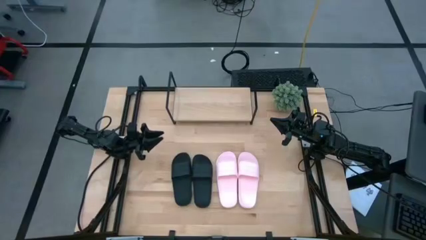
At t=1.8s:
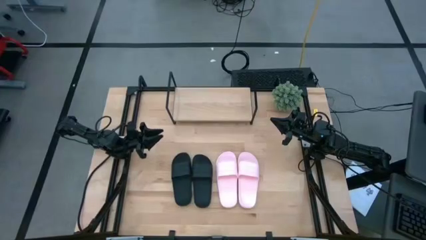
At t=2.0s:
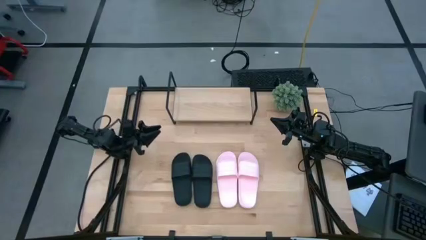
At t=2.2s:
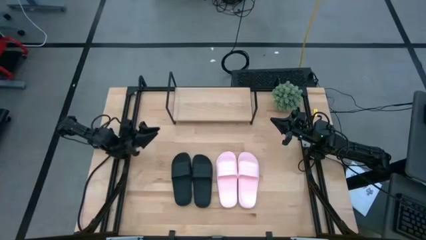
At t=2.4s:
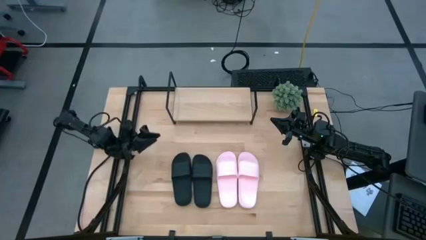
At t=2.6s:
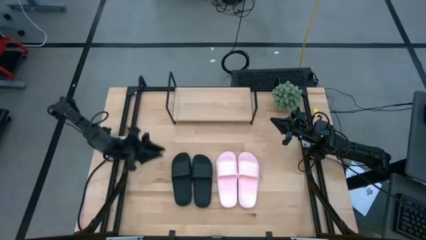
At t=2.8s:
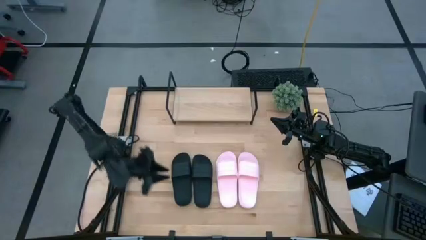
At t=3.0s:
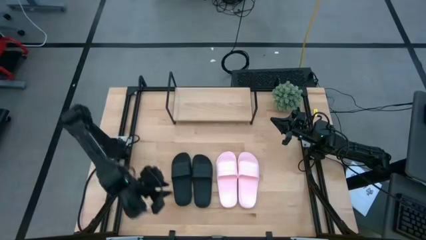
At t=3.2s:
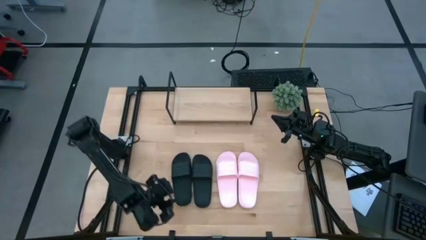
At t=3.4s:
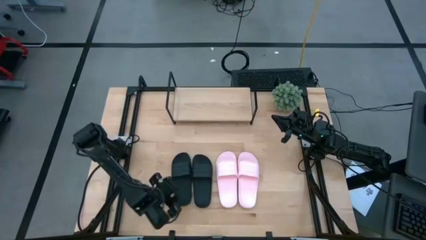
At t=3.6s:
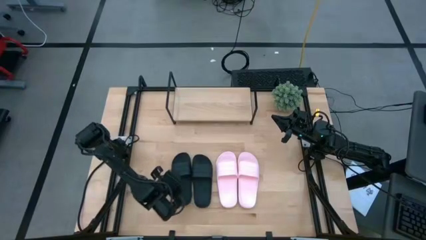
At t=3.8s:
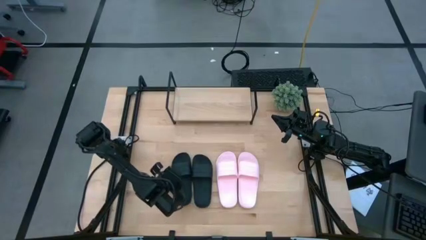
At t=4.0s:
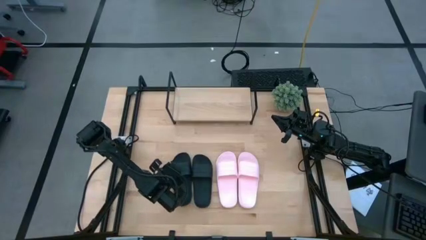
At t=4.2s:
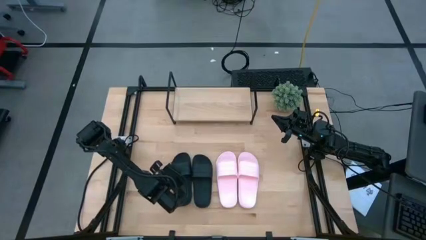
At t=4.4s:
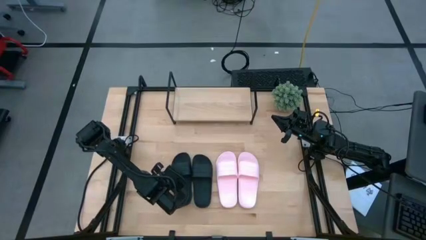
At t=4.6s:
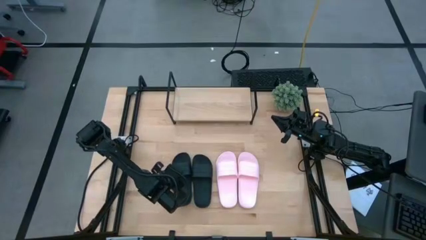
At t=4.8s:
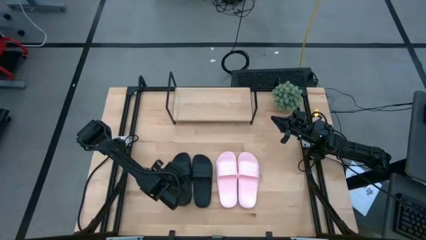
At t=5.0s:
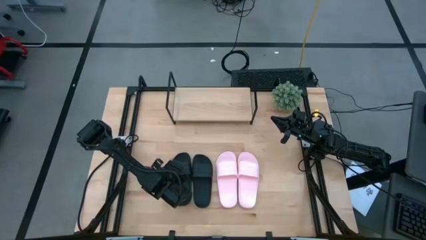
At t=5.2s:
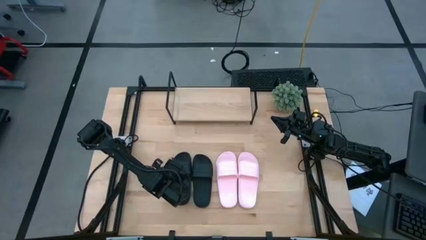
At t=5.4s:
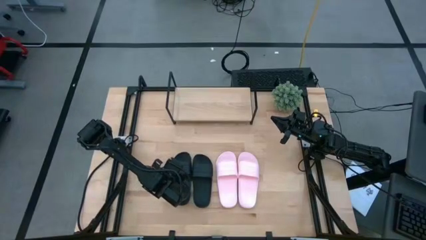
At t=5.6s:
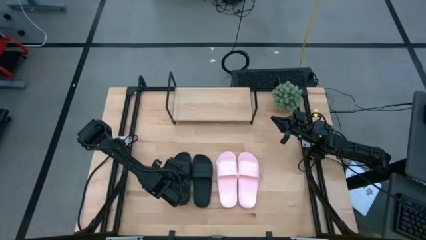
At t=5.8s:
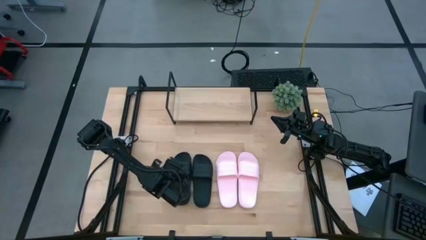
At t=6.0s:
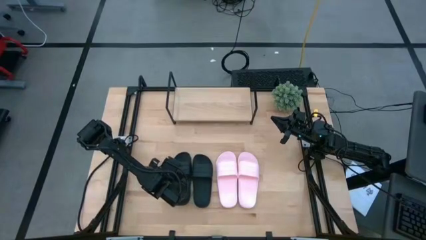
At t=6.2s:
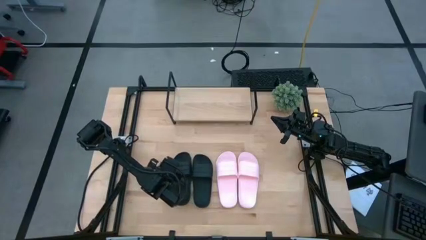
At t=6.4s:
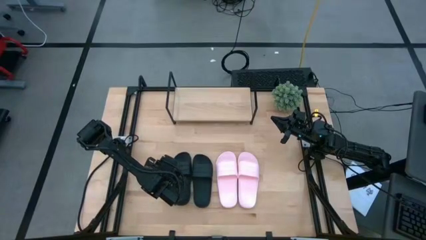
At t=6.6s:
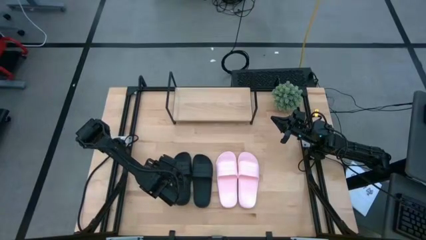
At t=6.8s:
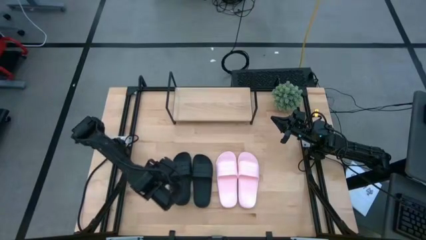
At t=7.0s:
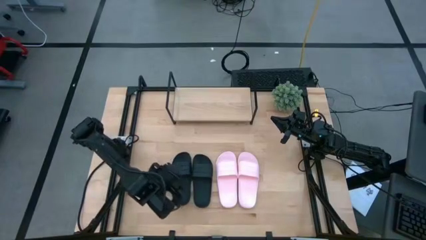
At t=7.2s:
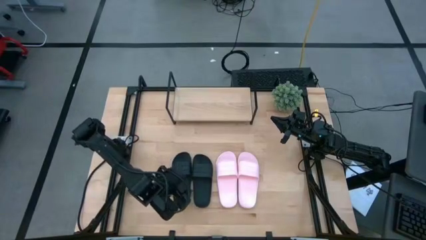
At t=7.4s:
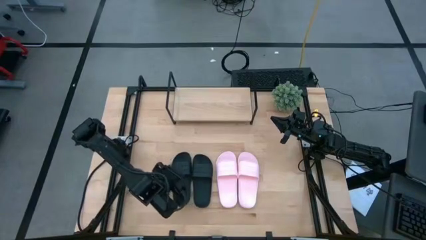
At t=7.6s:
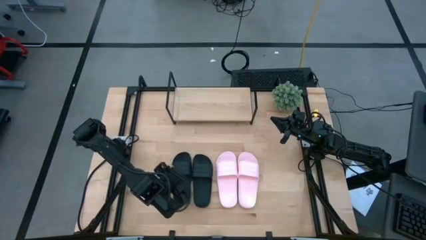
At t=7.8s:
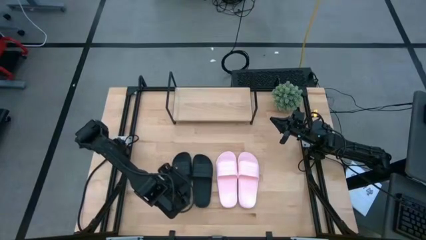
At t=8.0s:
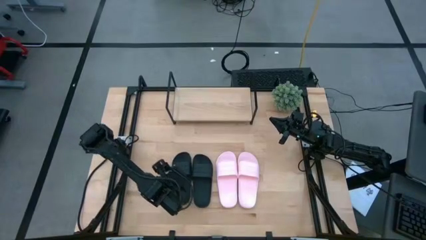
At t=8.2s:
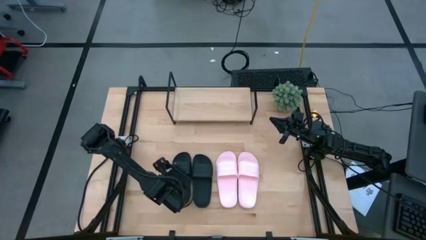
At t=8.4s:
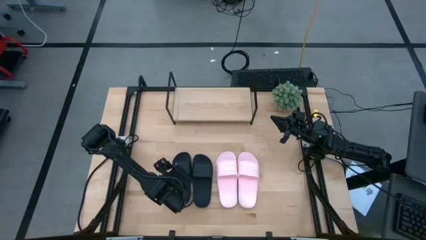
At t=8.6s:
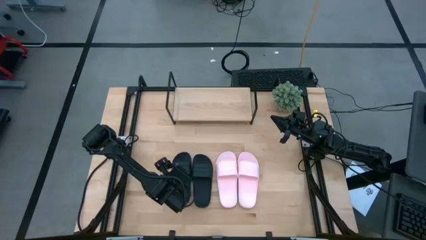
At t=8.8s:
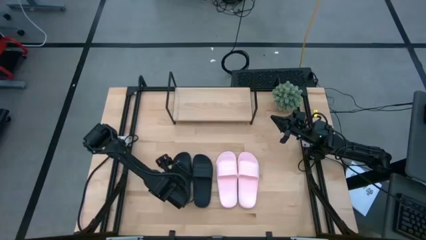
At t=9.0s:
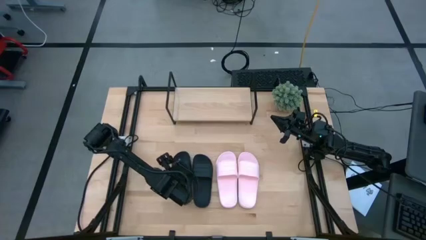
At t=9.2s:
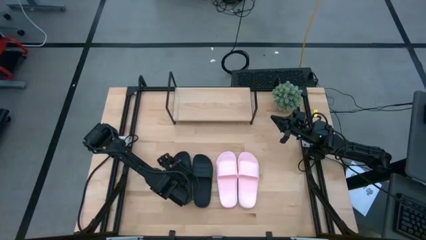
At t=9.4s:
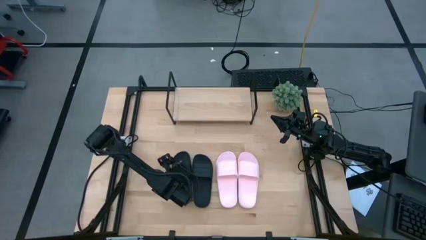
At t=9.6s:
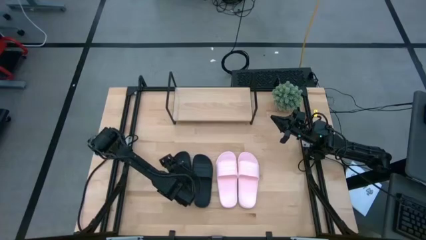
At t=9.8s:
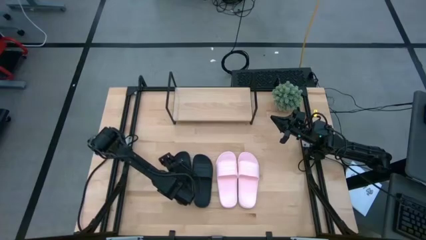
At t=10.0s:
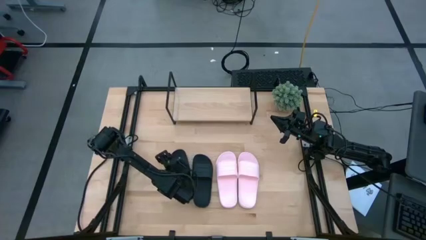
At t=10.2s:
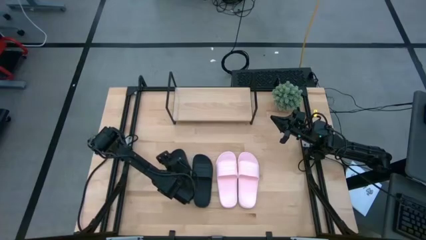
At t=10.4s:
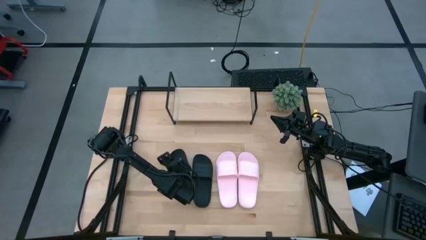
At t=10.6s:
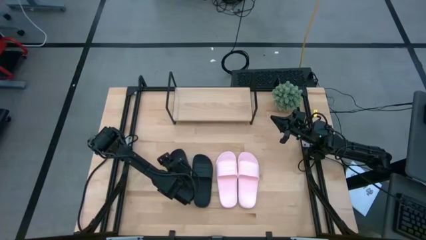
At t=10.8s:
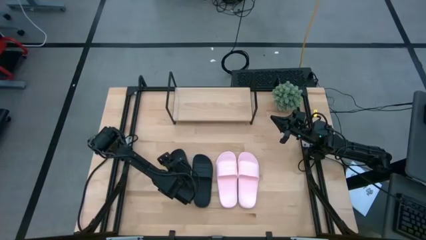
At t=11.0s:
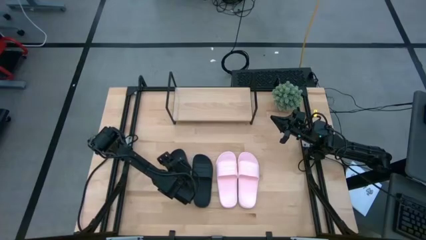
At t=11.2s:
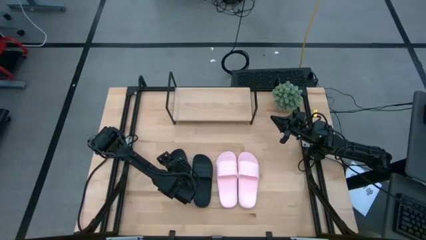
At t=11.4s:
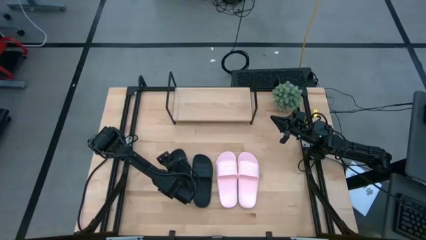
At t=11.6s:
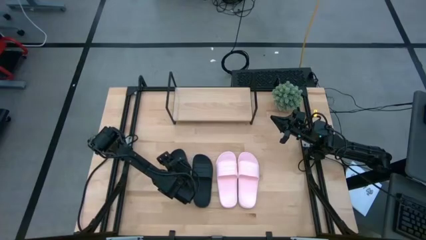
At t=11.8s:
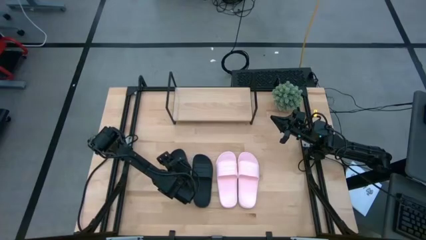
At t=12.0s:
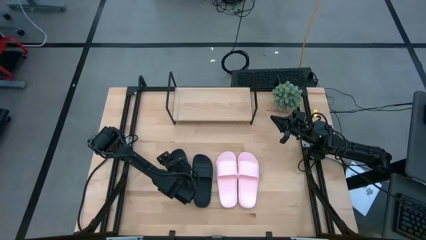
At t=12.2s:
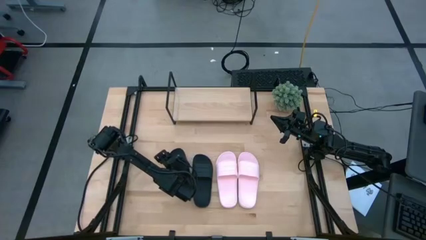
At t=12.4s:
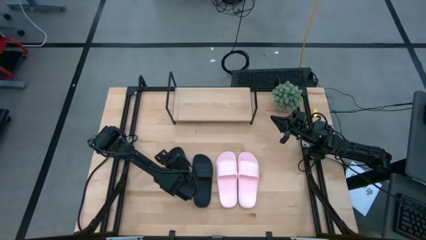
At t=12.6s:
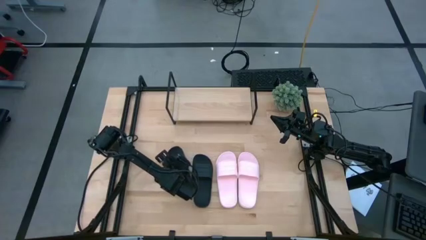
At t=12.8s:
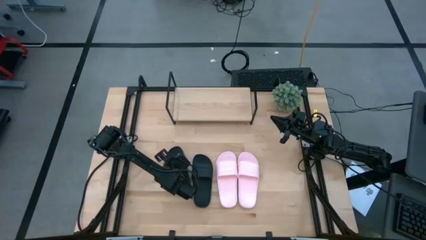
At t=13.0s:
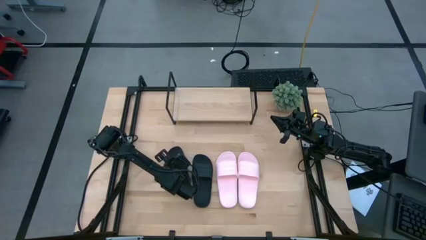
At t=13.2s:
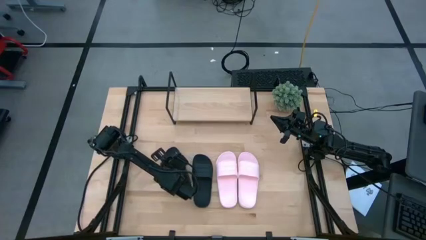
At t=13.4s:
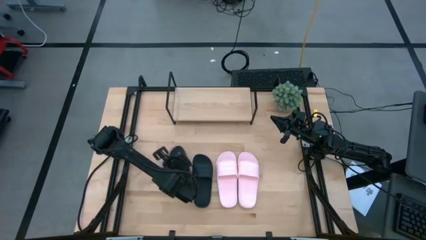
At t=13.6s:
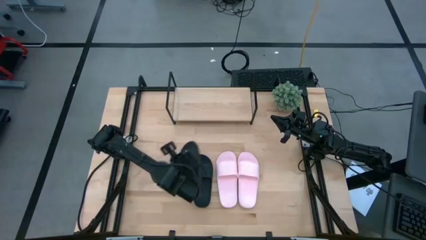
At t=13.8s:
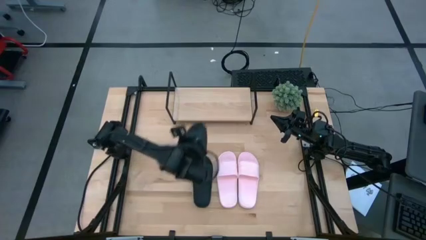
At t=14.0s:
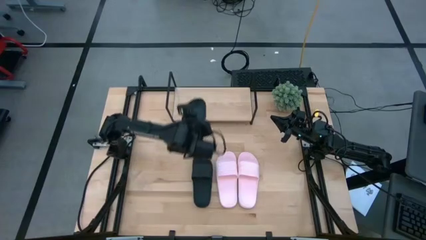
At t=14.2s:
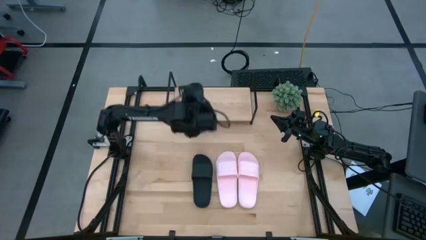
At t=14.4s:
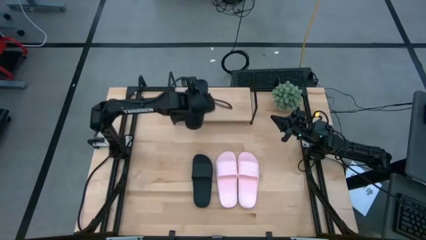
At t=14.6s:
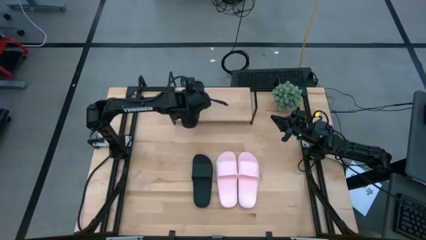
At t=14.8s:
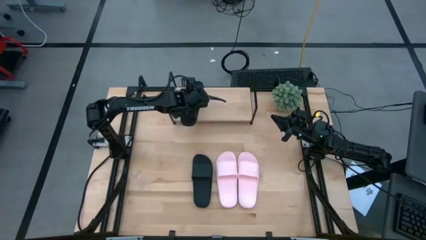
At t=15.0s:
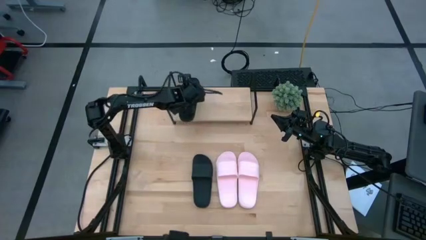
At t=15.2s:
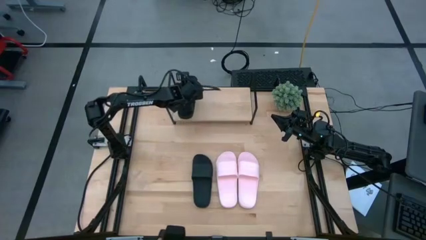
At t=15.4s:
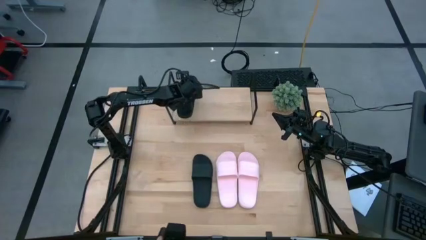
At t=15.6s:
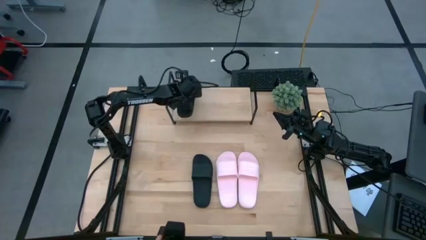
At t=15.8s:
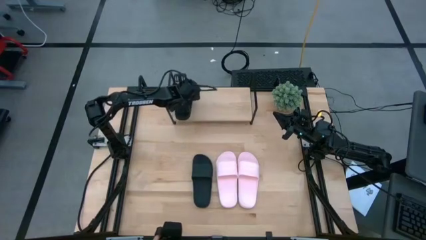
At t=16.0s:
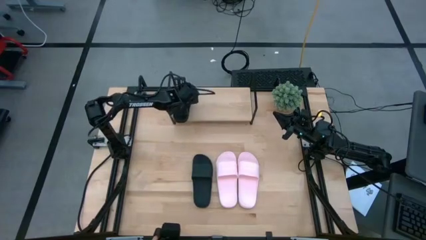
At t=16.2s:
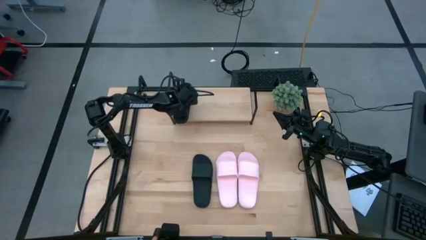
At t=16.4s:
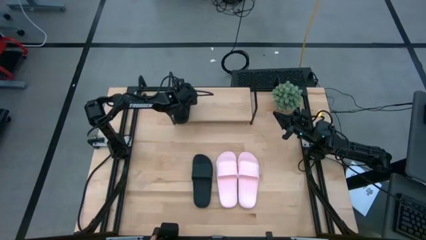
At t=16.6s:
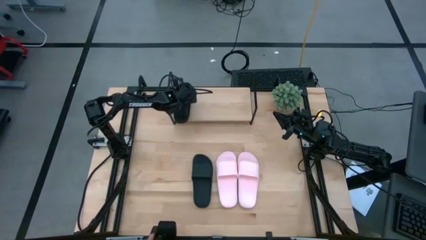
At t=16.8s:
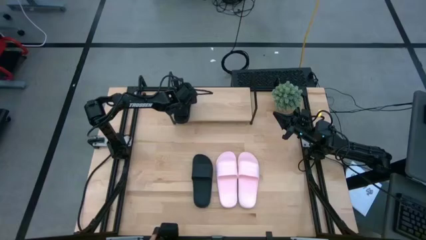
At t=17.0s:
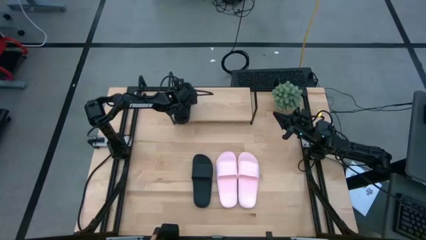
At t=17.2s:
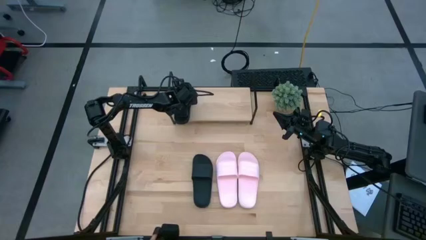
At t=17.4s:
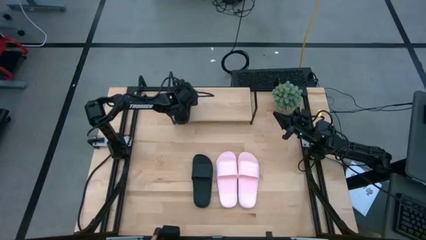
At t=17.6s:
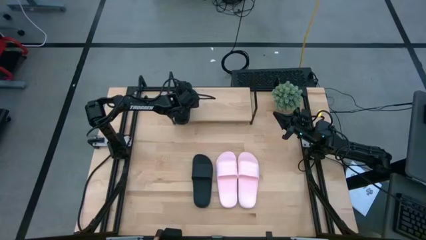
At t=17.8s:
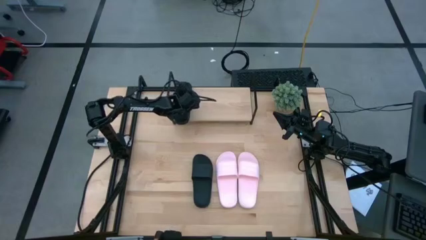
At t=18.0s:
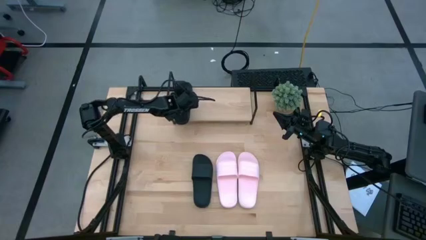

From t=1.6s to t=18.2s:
Task: Pick and place slides into the shelf
Put the left black slipper on the shelf
